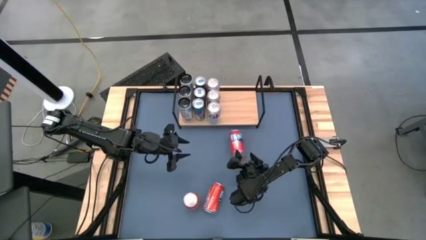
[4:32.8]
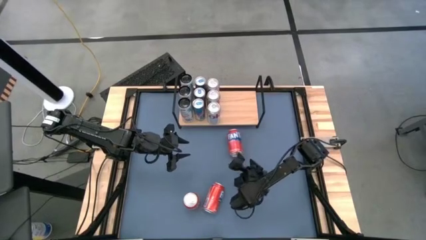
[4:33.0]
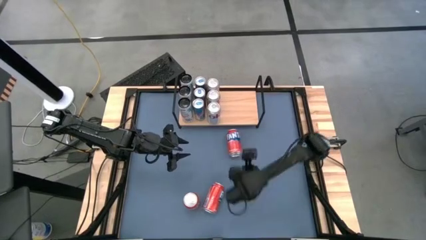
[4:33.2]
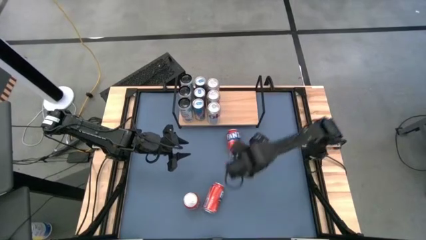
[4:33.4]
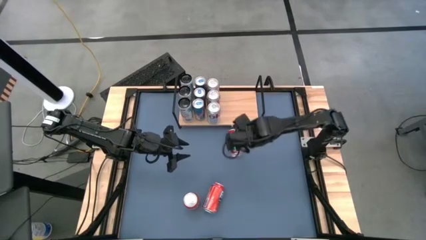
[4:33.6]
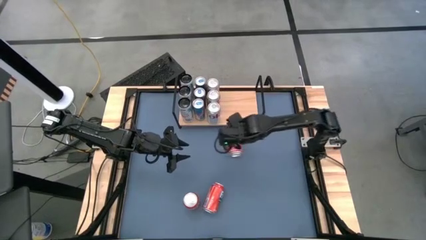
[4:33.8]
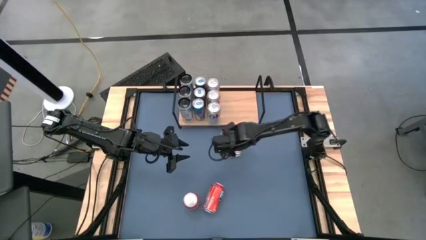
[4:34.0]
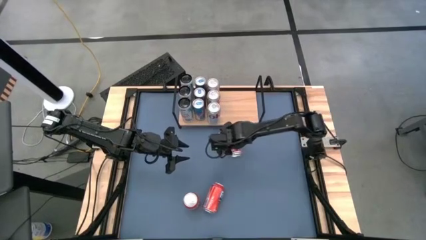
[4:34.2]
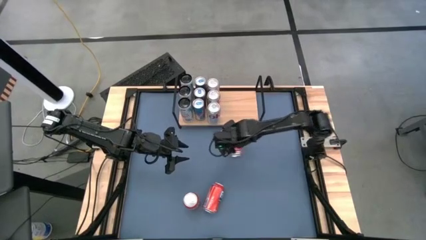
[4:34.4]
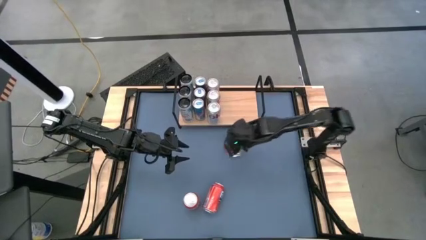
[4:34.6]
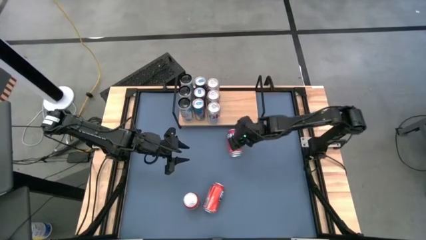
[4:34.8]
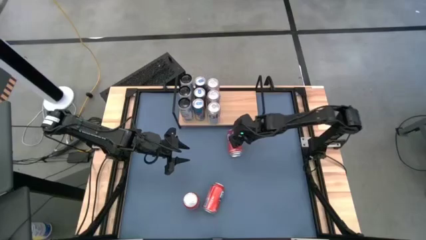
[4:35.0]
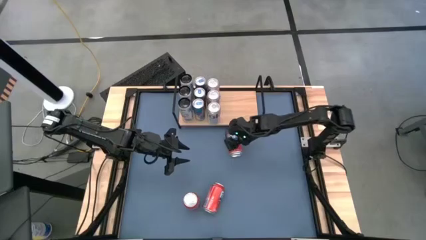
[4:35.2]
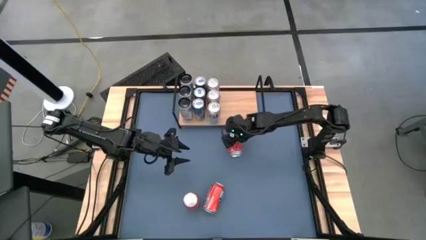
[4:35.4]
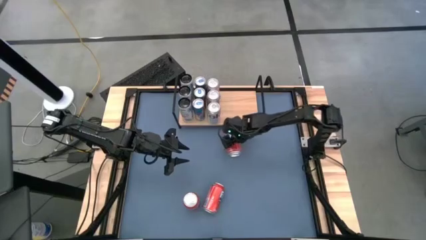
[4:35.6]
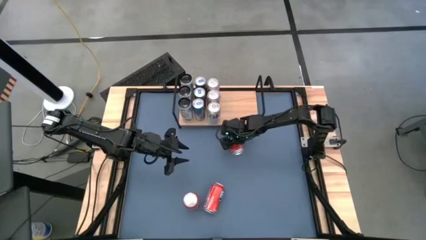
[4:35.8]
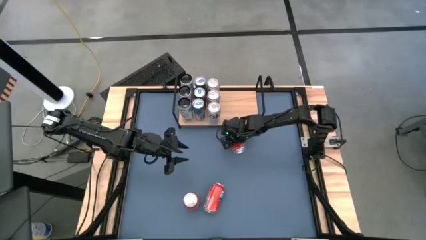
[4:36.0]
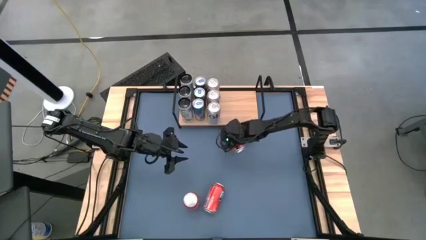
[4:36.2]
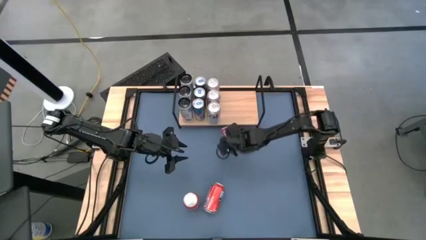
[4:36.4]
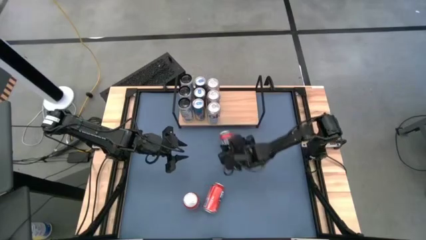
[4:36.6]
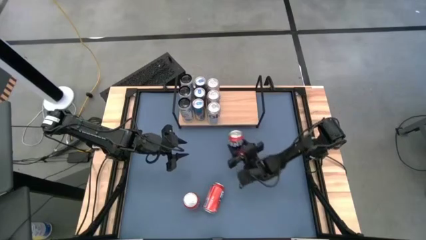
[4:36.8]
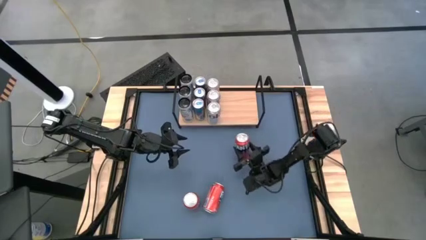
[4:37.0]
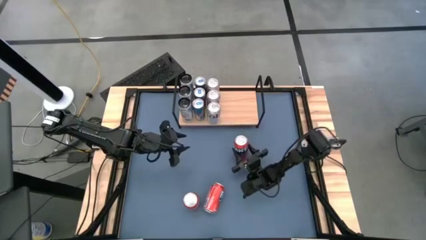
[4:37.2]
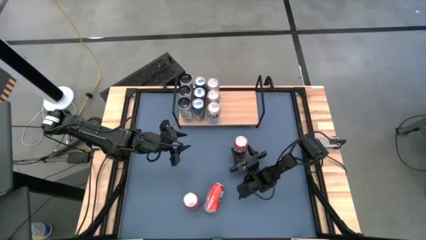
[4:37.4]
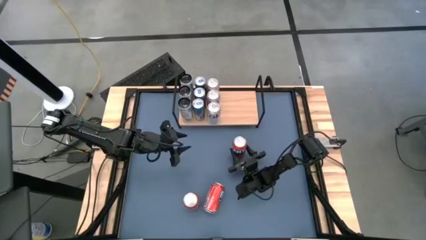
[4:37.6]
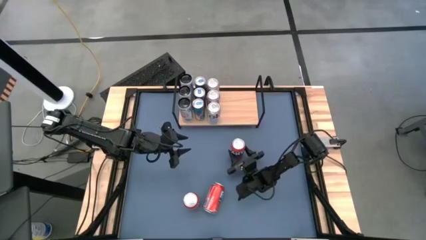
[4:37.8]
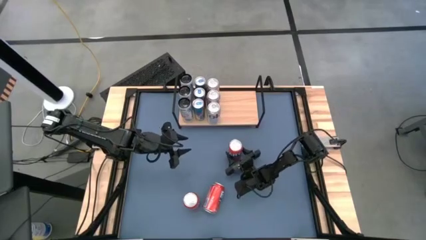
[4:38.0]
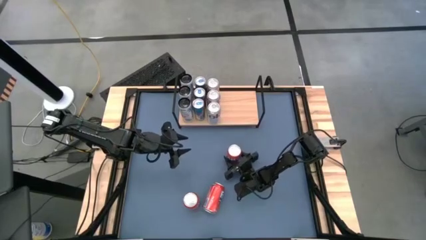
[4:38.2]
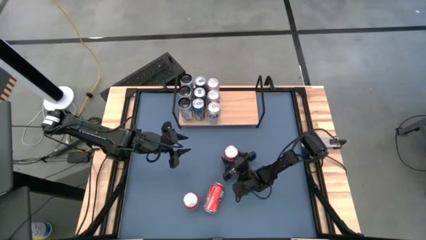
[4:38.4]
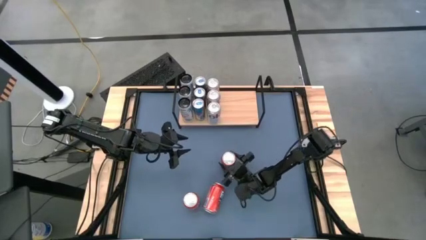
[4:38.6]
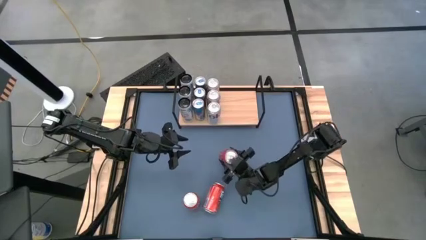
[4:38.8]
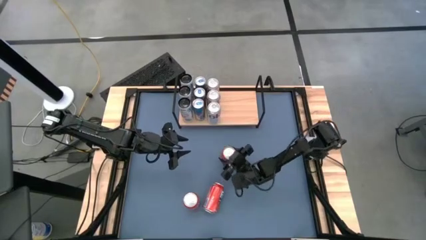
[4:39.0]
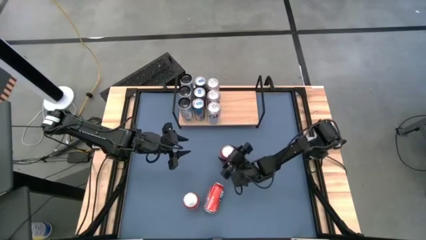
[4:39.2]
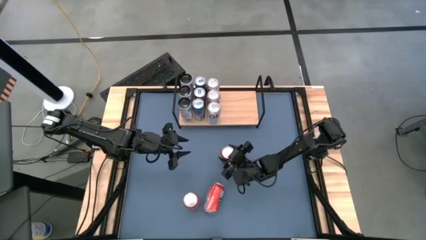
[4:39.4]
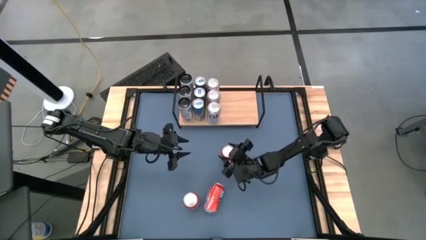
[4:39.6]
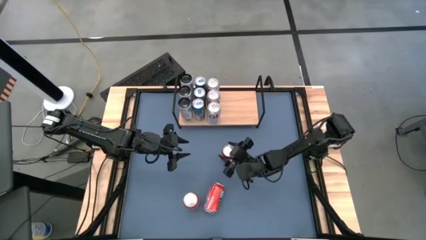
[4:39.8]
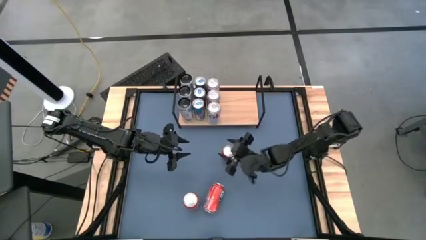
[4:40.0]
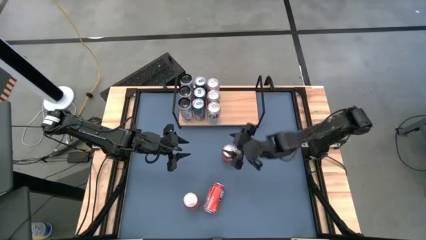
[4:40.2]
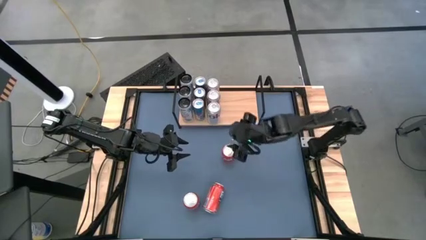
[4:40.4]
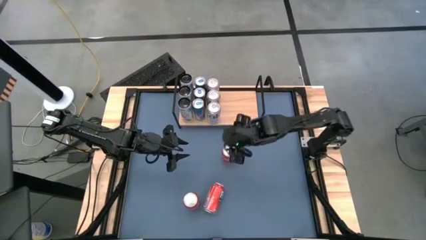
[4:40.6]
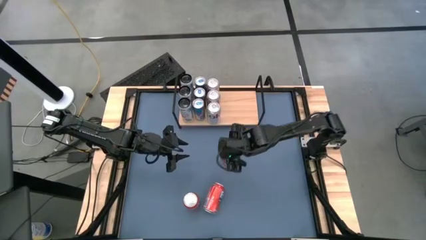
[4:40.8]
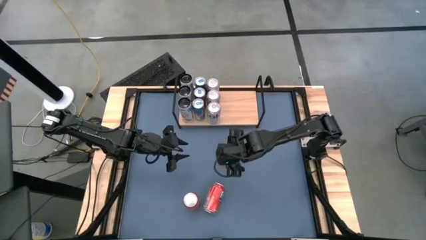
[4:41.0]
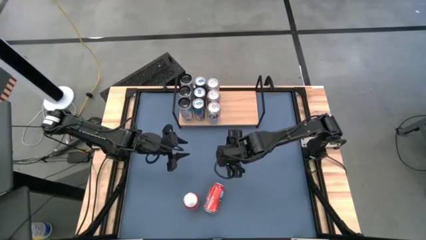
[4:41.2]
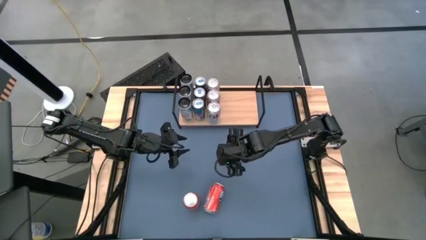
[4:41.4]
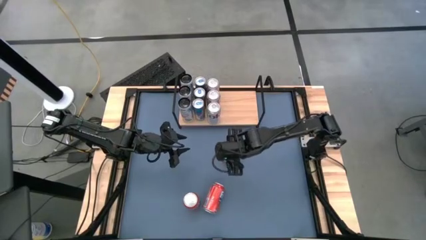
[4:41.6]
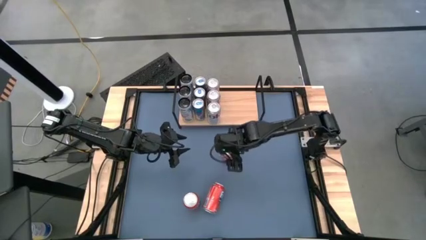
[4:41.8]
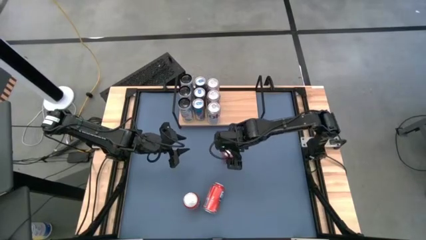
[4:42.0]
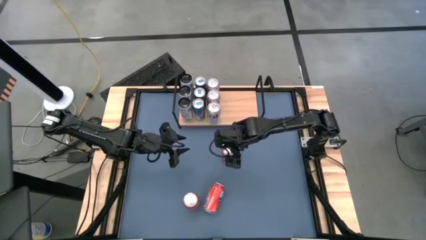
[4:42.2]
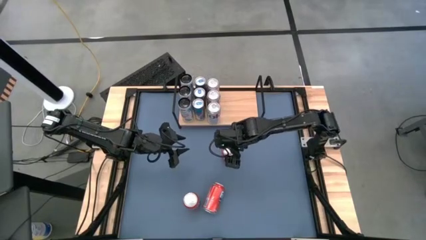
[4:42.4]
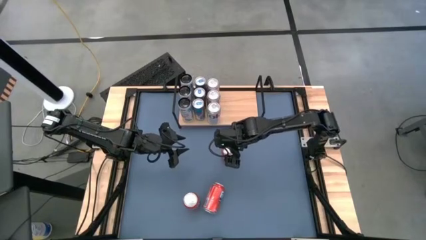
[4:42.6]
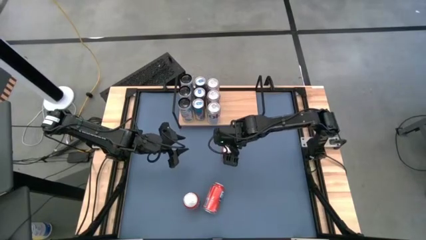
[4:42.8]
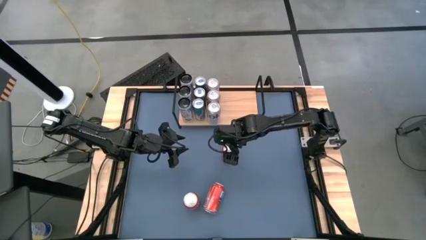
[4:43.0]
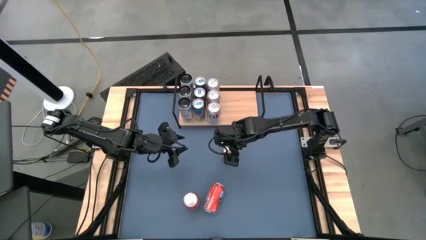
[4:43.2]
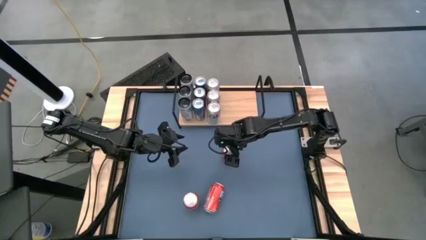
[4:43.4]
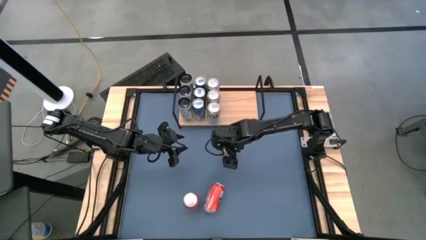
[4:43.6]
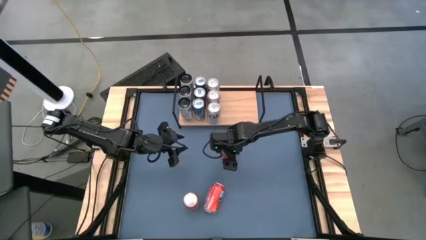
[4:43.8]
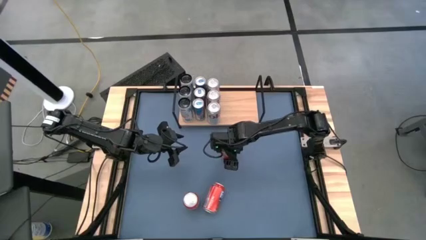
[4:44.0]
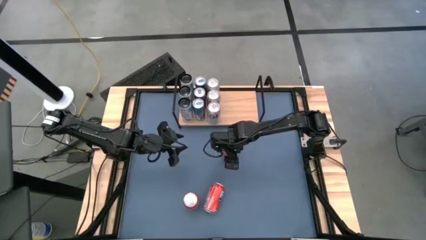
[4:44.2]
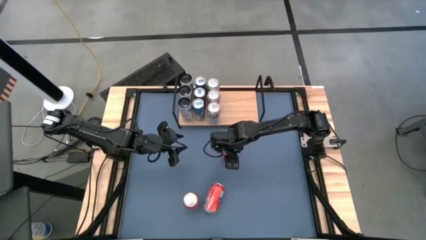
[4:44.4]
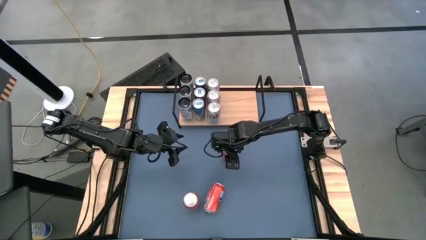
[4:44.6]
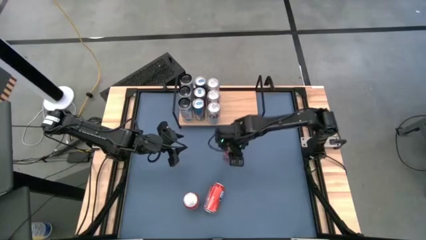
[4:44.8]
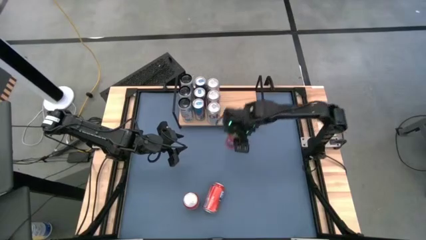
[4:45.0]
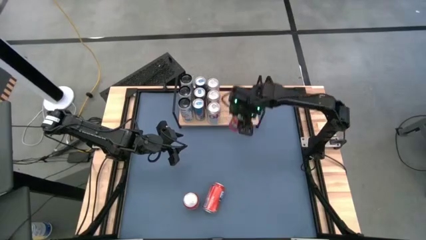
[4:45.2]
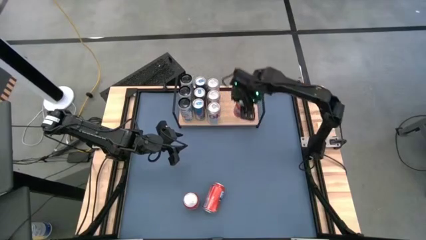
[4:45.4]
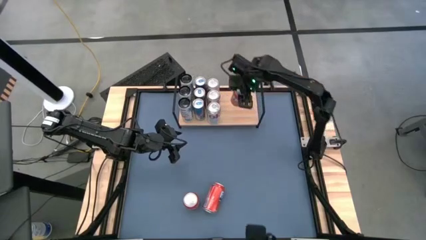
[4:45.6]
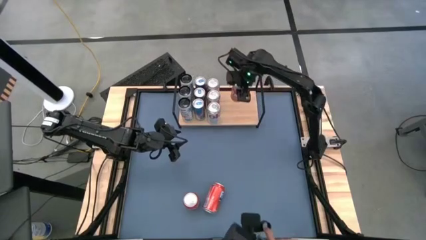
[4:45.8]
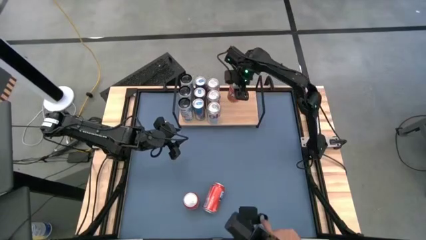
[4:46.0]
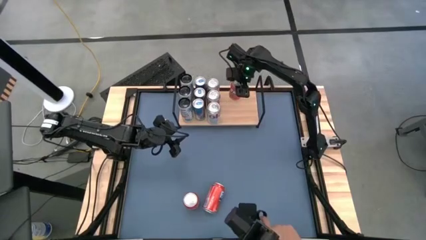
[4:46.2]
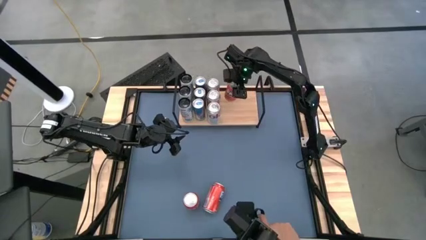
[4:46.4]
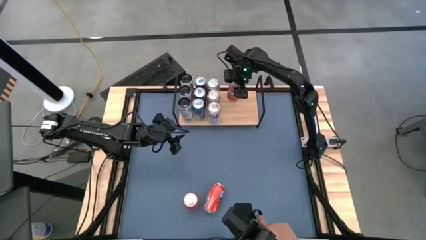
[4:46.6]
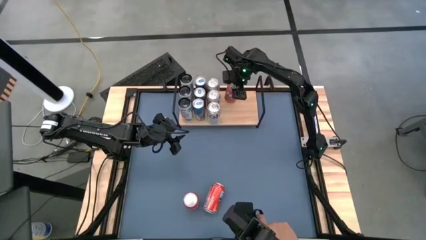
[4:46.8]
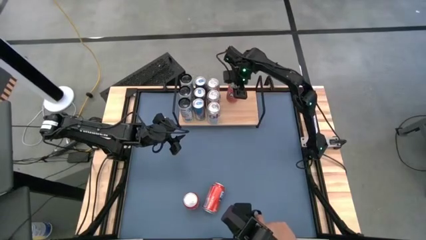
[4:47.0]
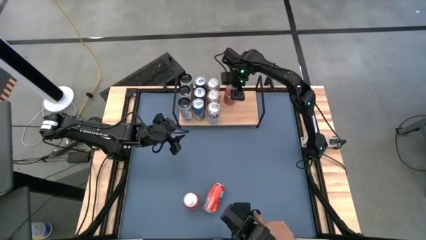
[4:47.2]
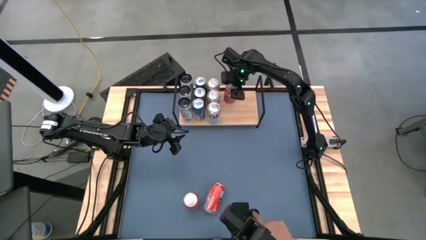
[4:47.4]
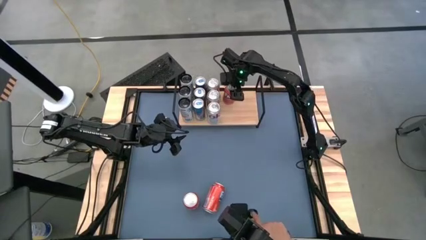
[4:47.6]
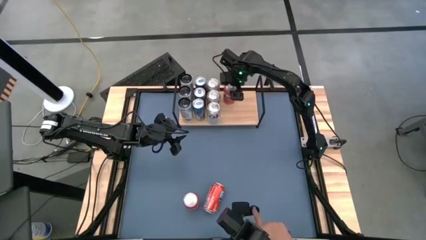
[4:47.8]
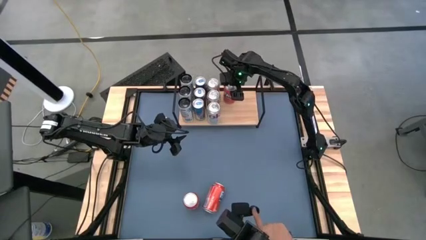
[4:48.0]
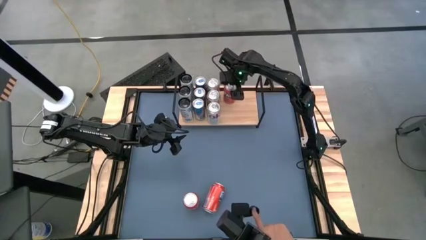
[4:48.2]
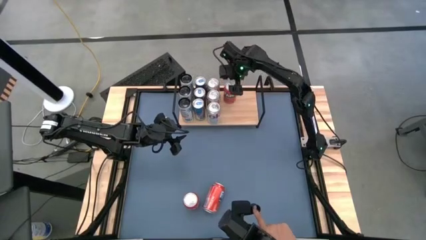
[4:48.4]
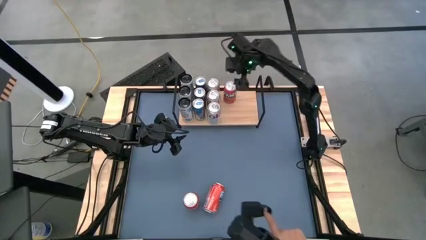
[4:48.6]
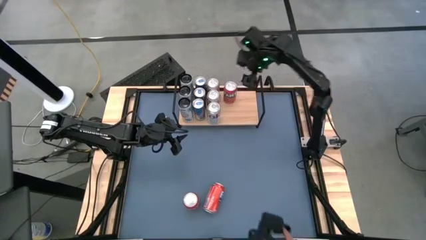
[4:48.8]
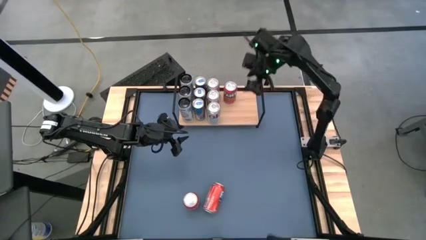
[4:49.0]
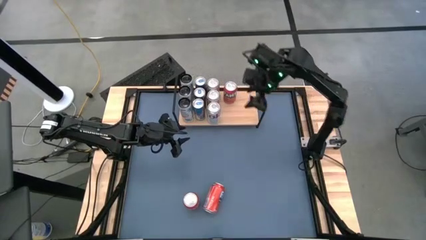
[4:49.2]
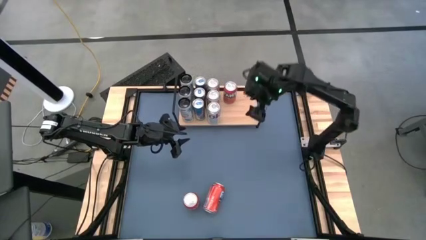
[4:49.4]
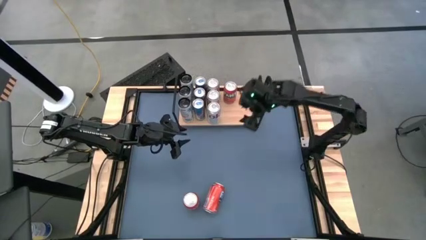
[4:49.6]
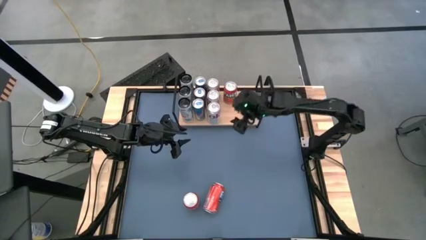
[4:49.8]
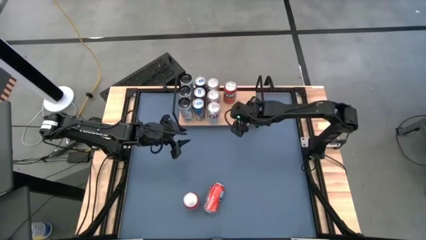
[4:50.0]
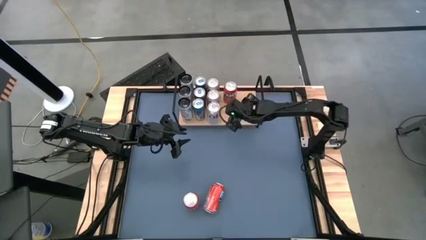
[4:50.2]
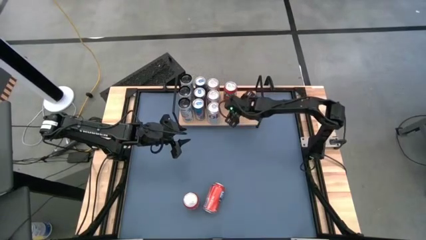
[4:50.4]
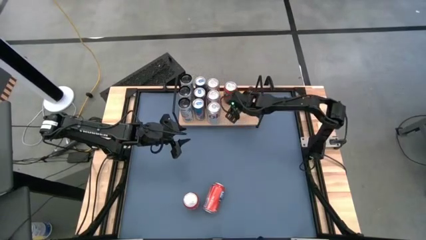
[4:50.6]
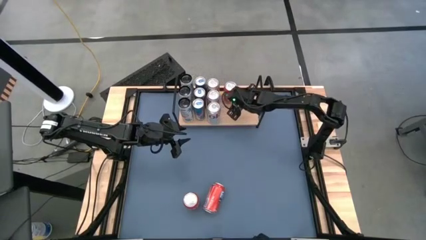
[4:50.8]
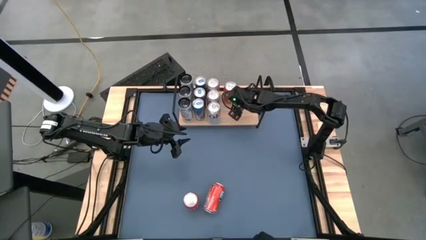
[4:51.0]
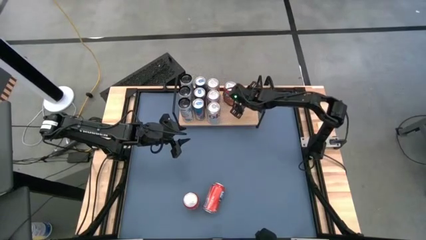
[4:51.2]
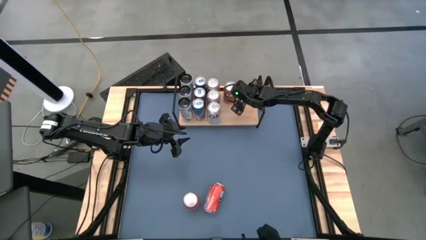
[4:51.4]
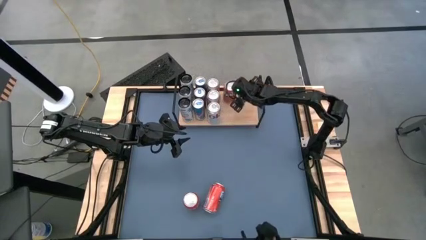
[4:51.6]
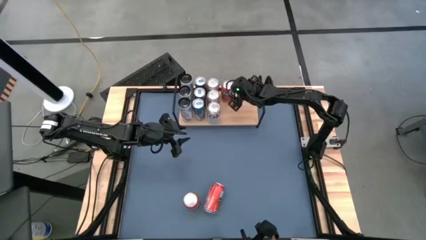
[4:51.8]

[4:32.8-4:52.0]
Task: Place canned beverage on shelf
Put the top red soda can on the shelf
